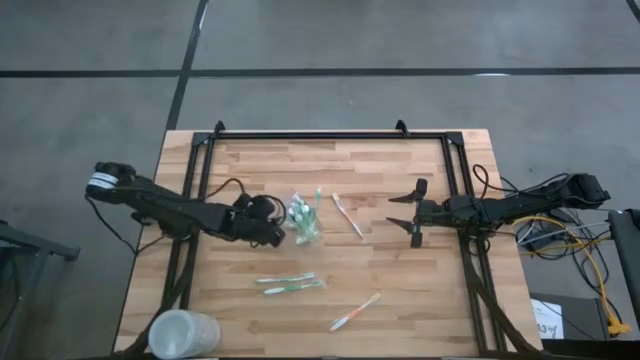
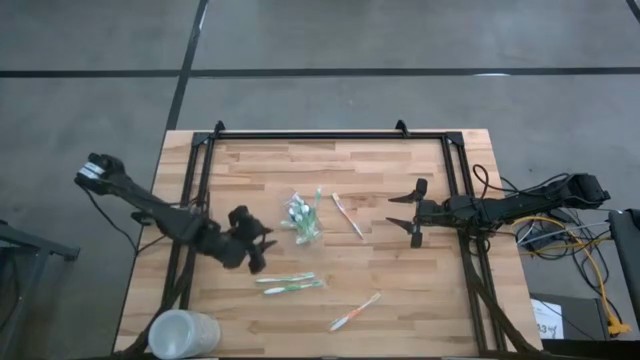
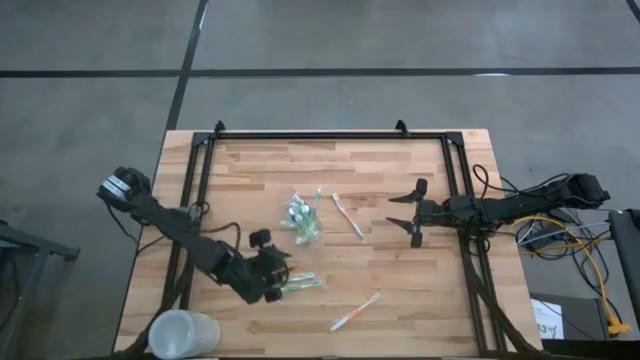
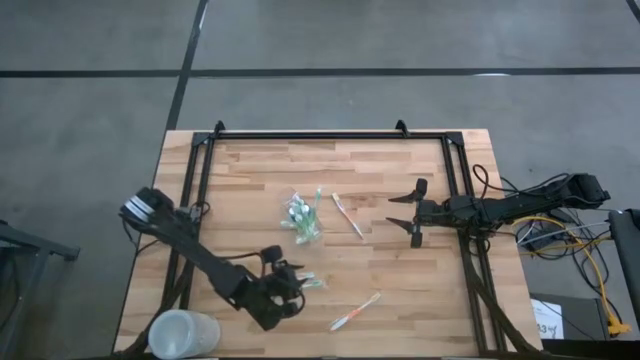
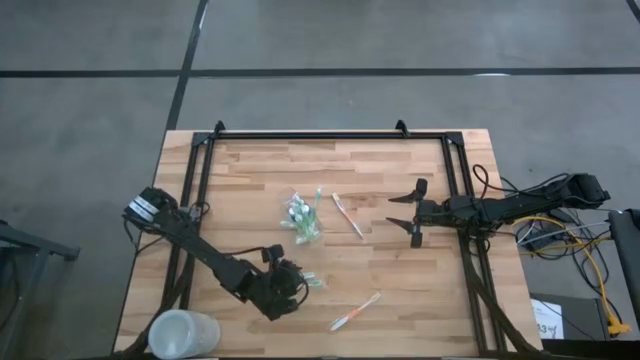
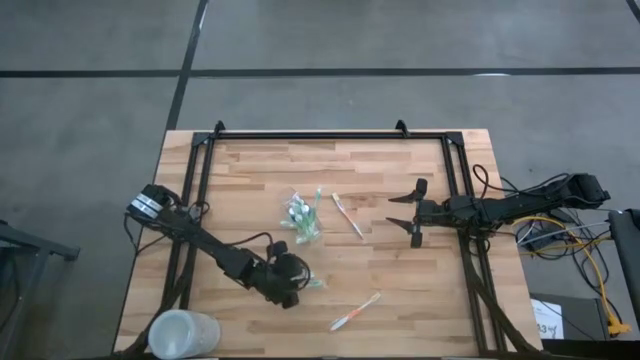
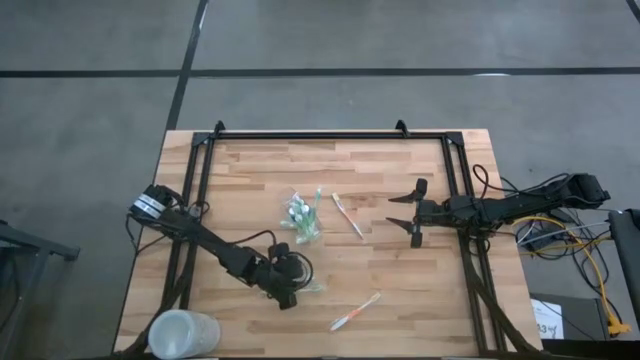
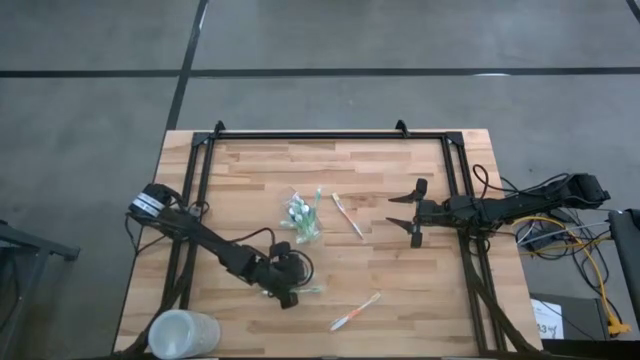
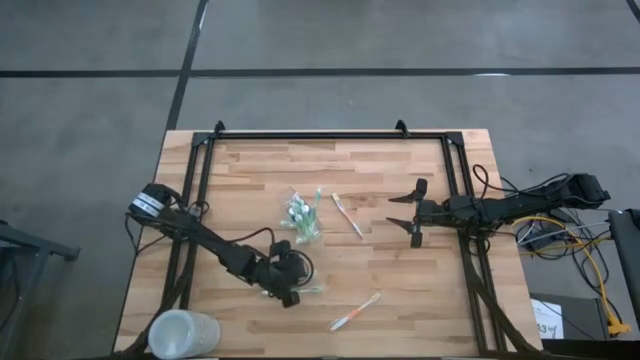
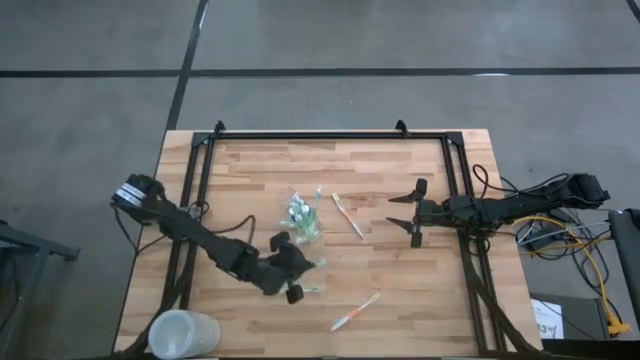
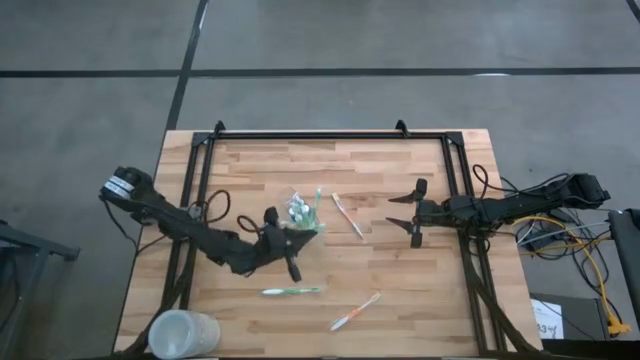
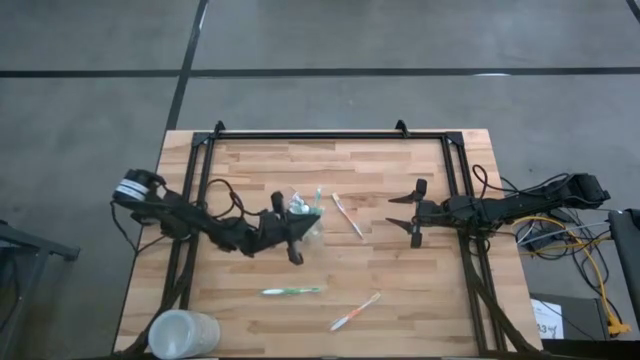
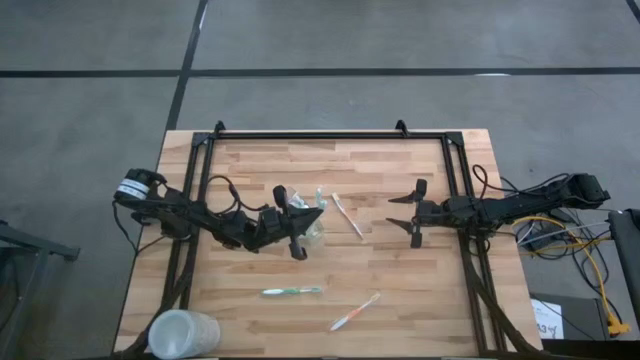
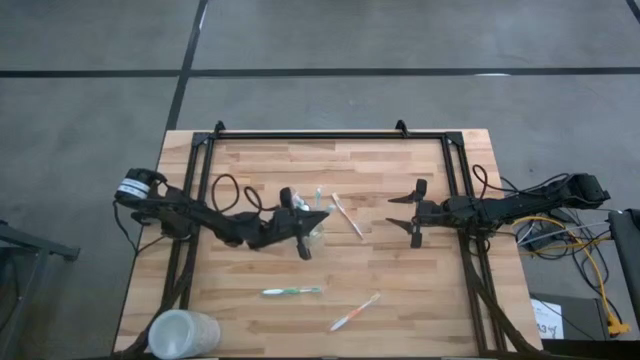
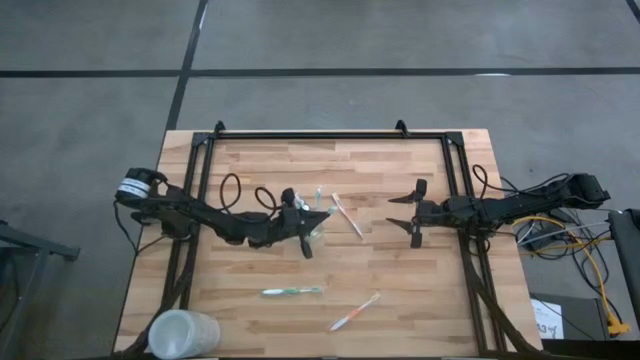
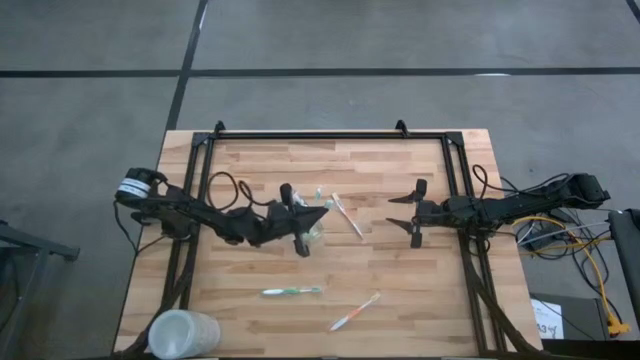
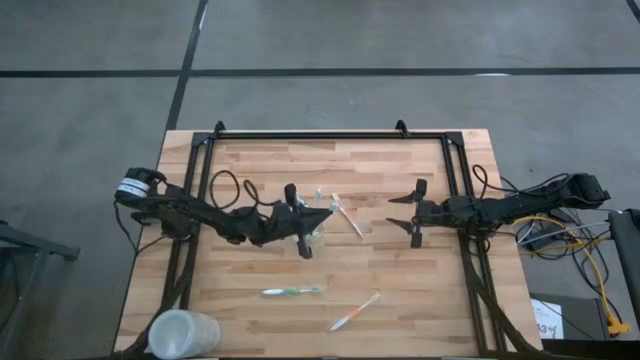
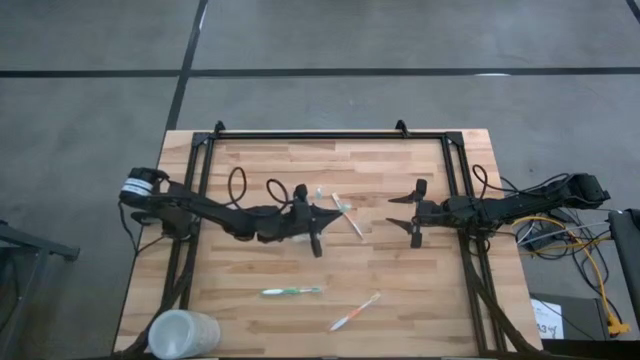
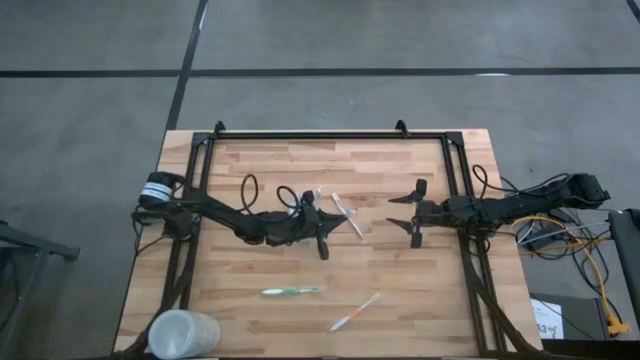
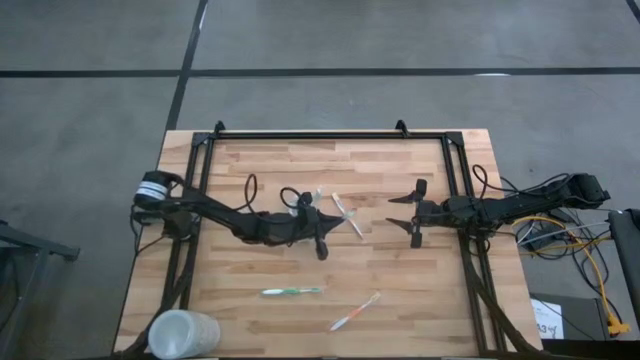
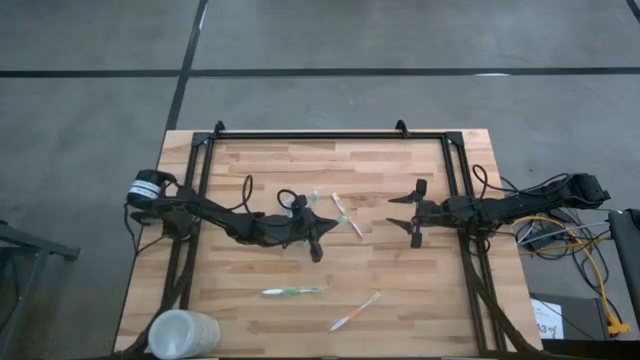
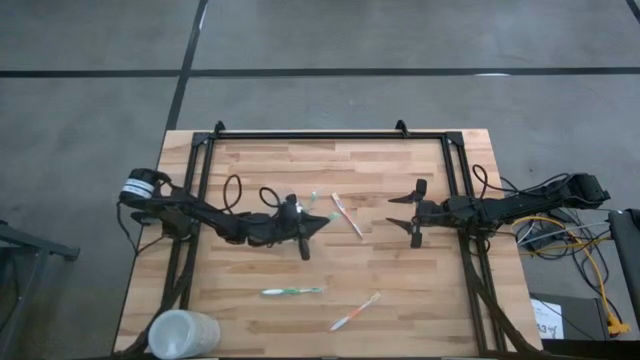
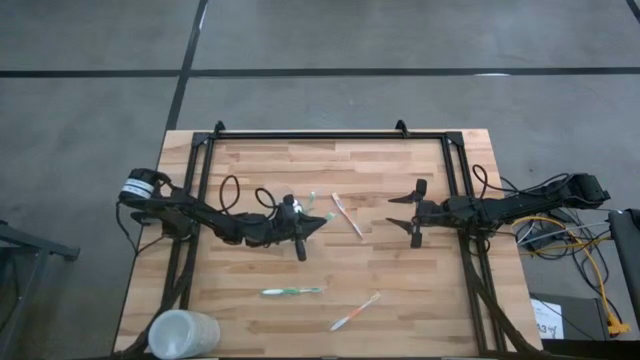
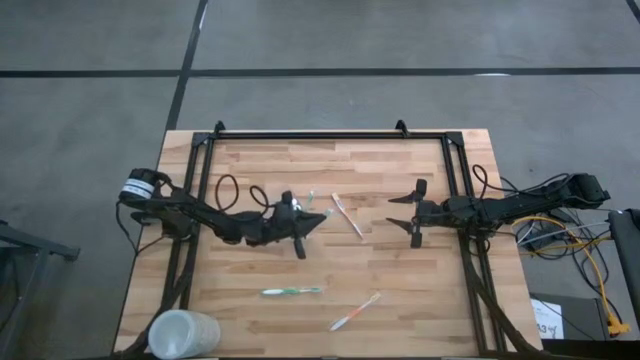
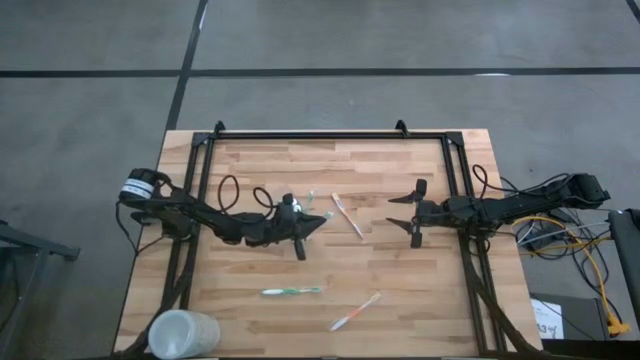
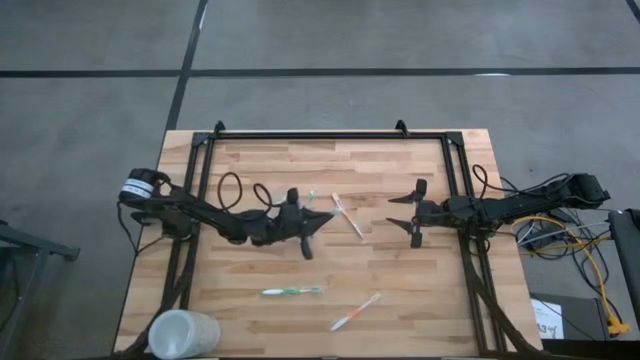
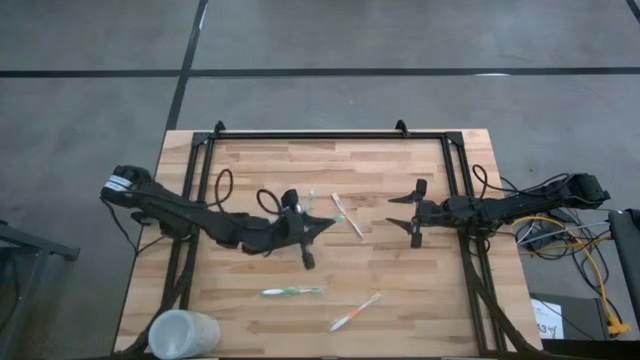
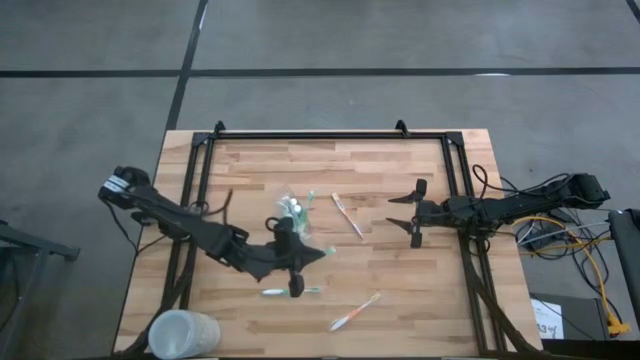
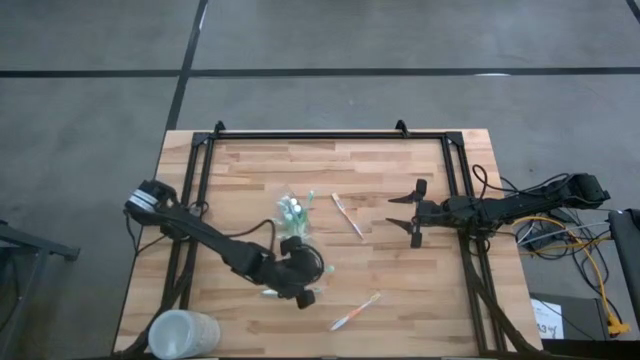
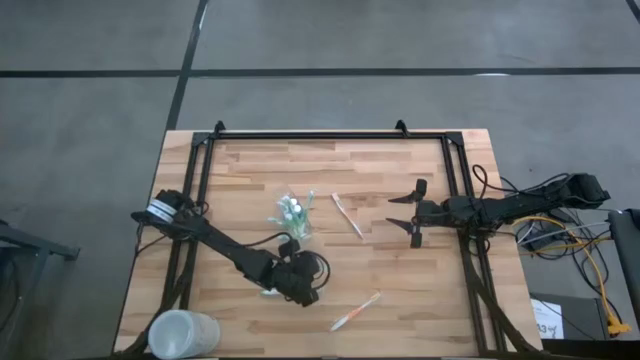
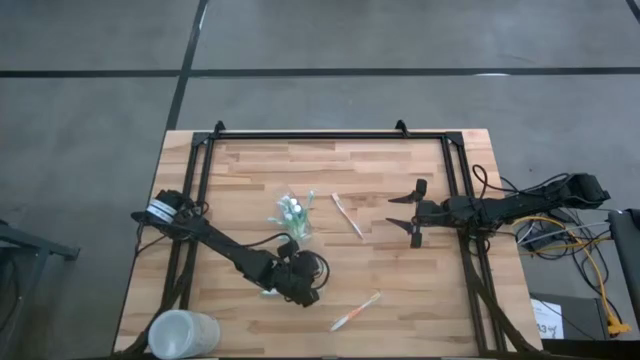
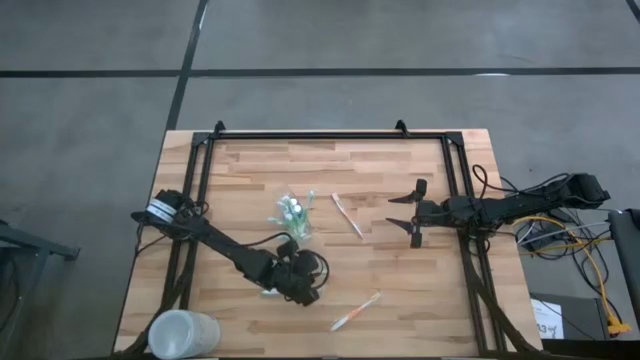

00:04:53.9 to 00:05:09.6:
Task: Pick & Place toothbrushing station
Put the green toothbrush into the transparent organizer

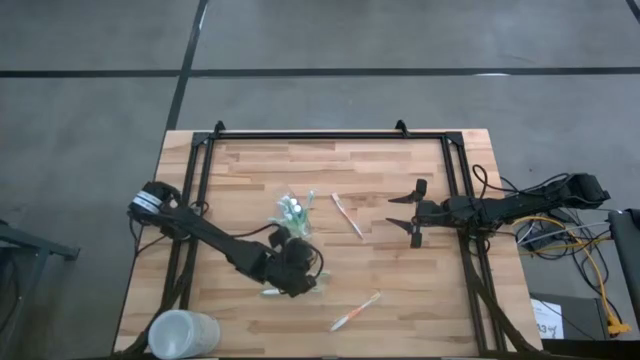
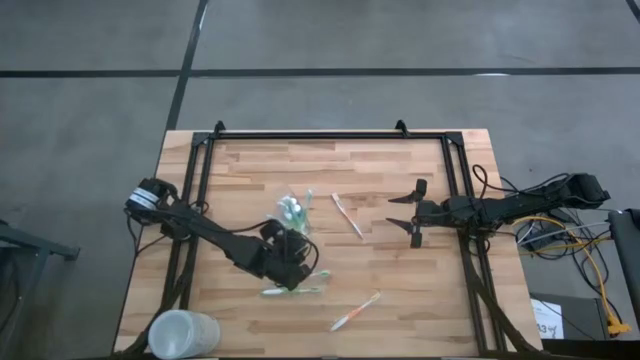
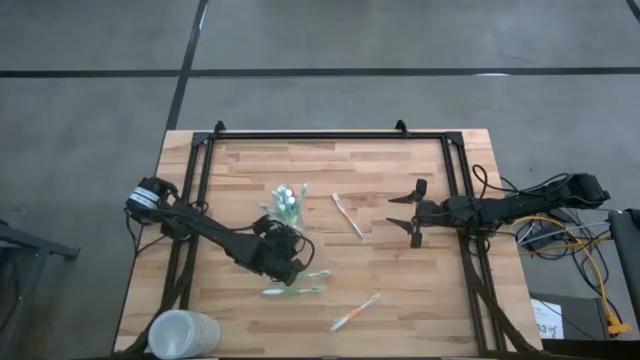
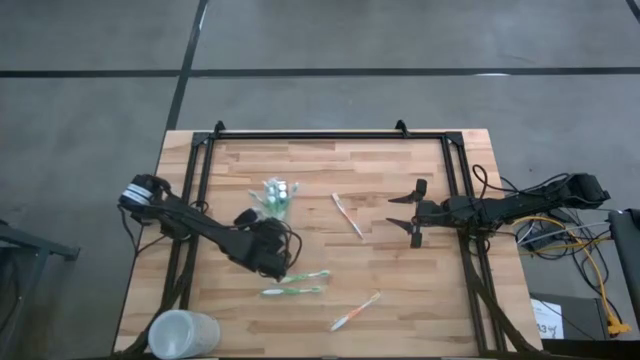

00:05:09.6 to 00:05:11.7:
Adjust the transparent organizer on the table
